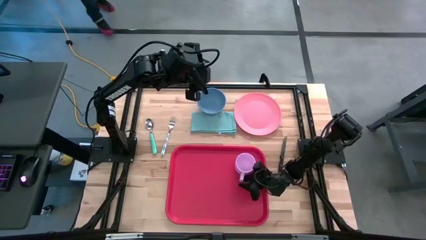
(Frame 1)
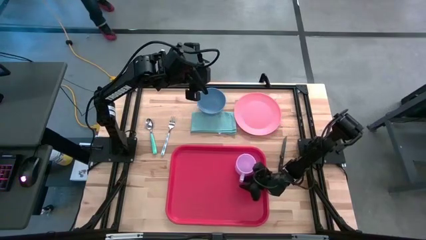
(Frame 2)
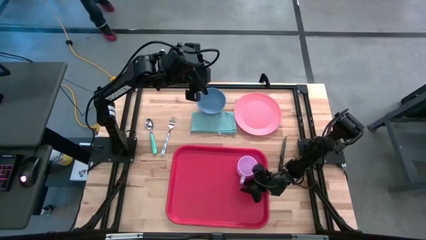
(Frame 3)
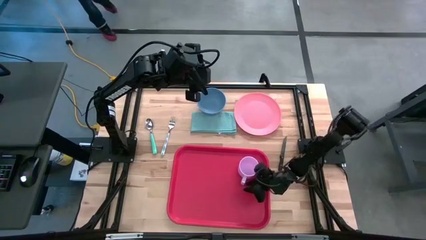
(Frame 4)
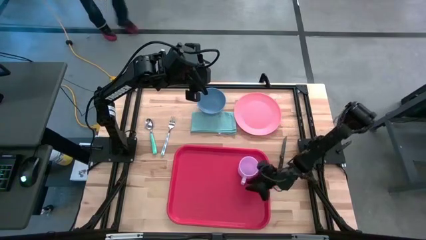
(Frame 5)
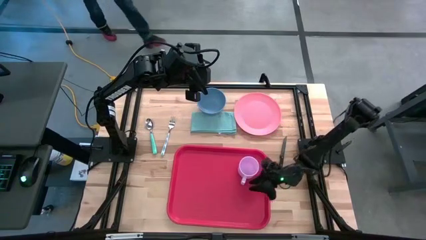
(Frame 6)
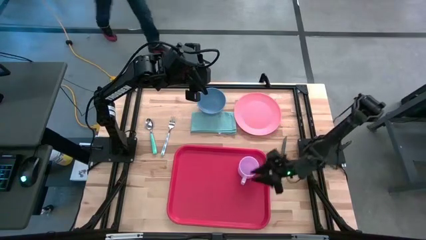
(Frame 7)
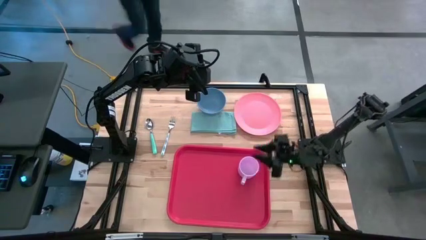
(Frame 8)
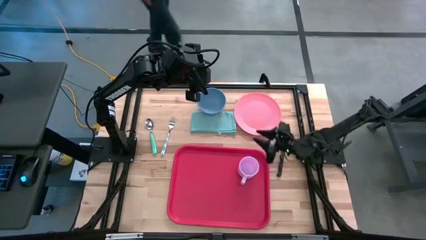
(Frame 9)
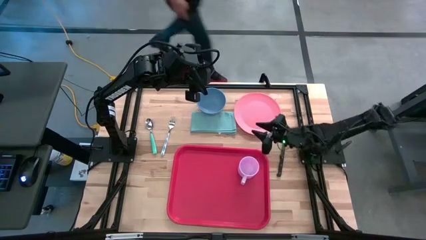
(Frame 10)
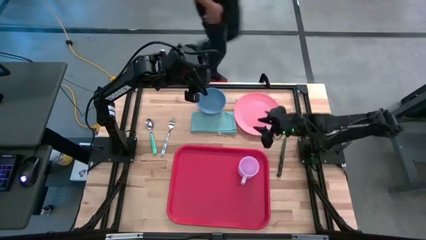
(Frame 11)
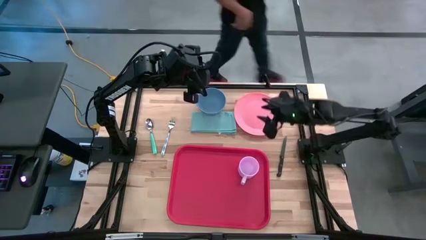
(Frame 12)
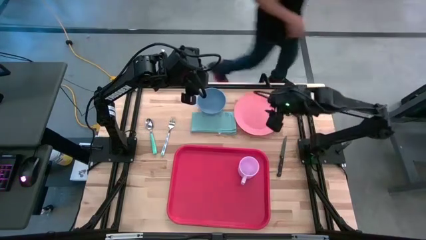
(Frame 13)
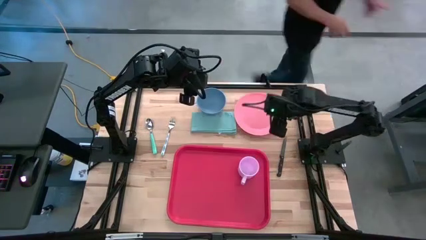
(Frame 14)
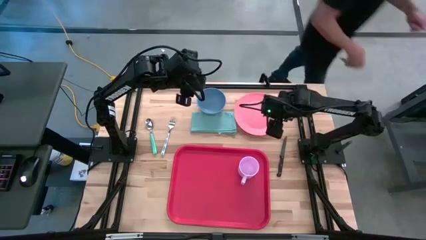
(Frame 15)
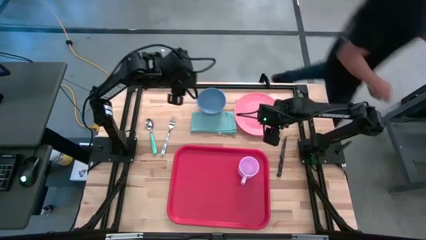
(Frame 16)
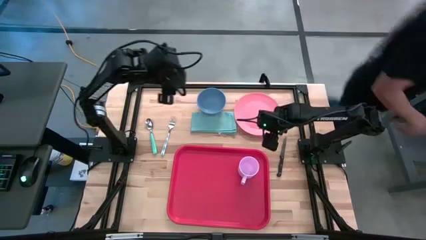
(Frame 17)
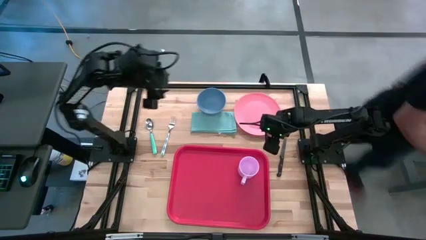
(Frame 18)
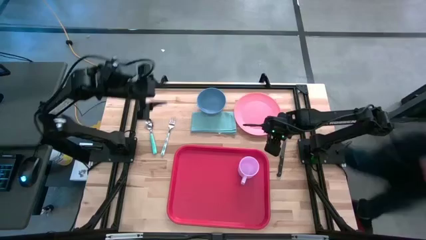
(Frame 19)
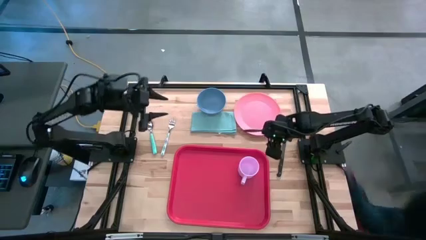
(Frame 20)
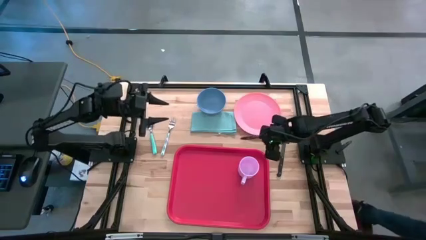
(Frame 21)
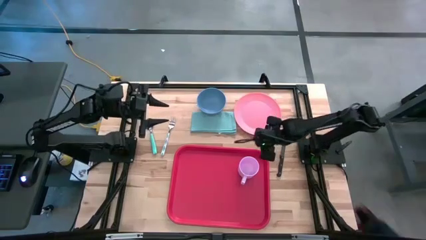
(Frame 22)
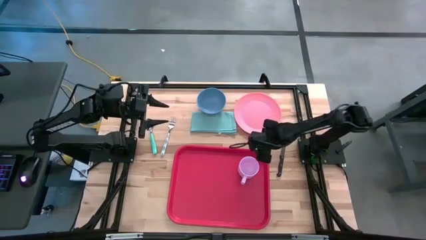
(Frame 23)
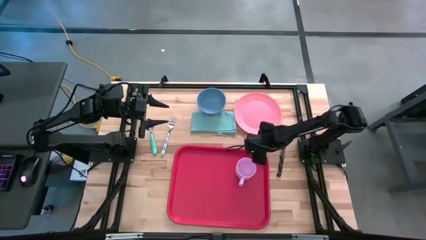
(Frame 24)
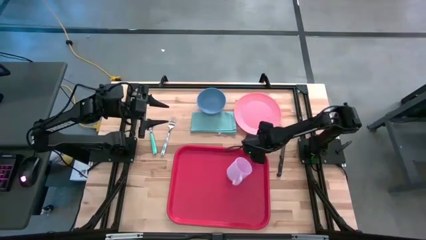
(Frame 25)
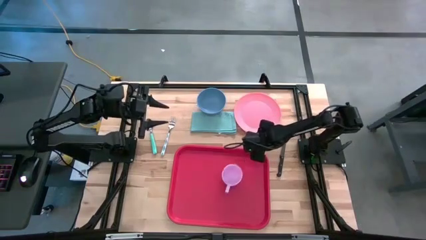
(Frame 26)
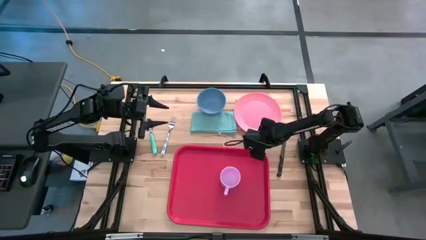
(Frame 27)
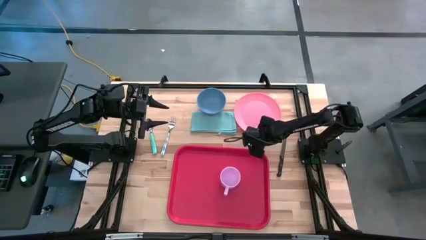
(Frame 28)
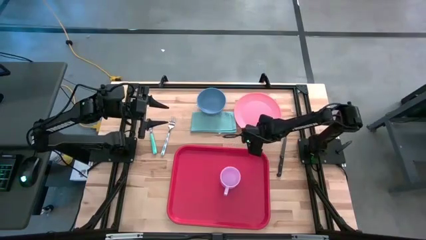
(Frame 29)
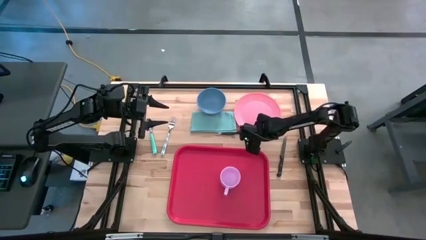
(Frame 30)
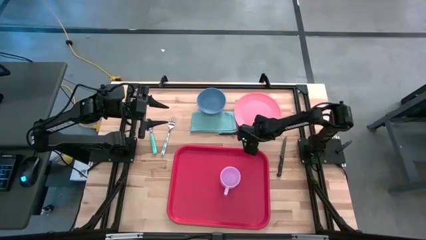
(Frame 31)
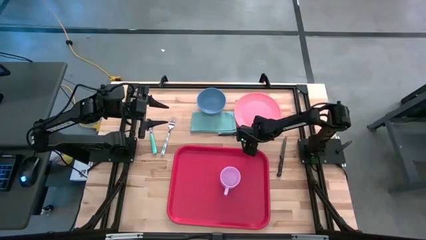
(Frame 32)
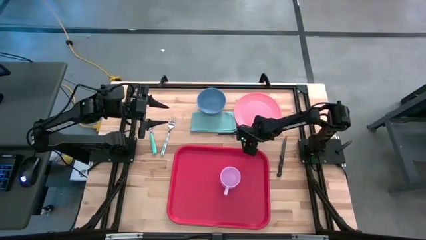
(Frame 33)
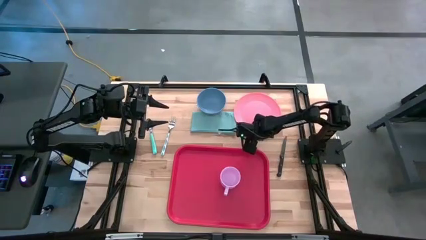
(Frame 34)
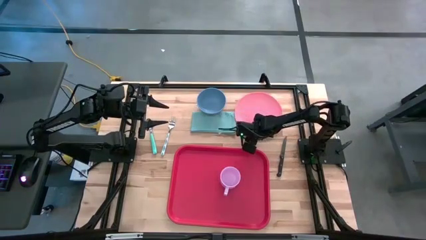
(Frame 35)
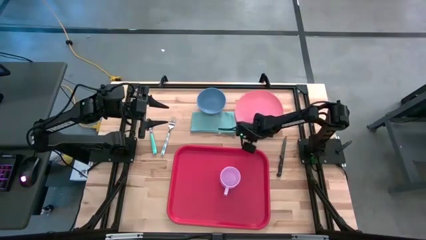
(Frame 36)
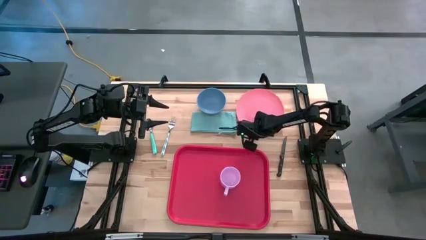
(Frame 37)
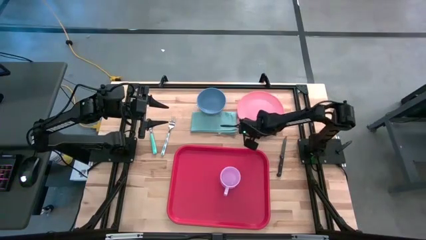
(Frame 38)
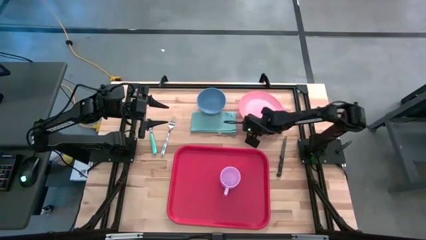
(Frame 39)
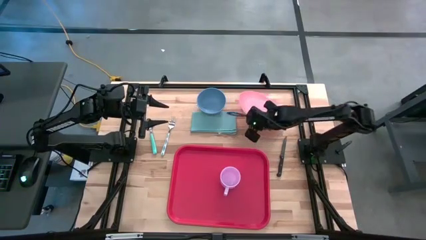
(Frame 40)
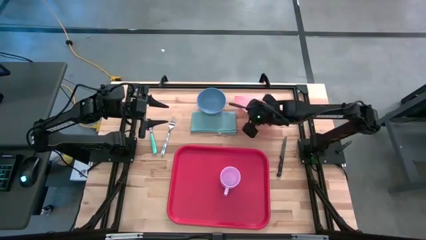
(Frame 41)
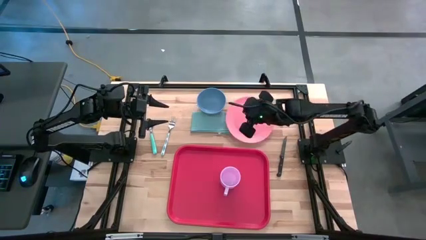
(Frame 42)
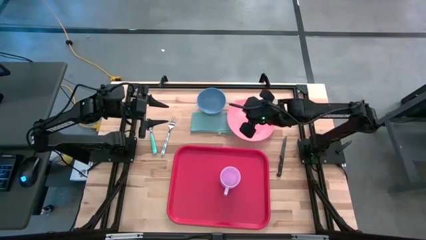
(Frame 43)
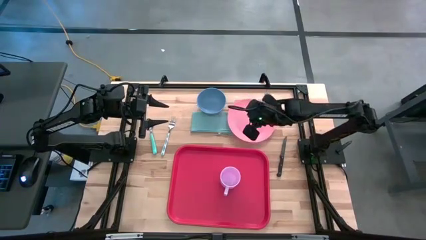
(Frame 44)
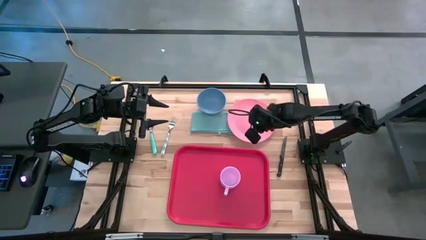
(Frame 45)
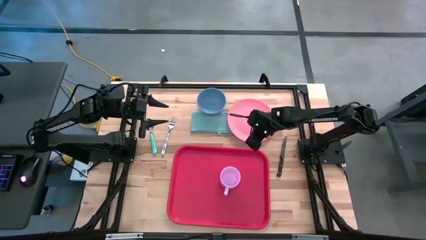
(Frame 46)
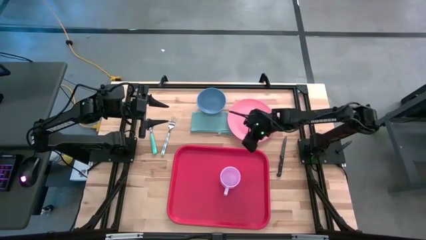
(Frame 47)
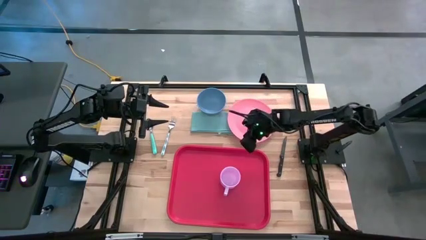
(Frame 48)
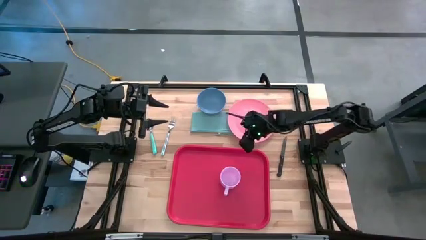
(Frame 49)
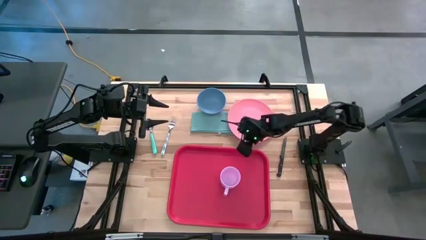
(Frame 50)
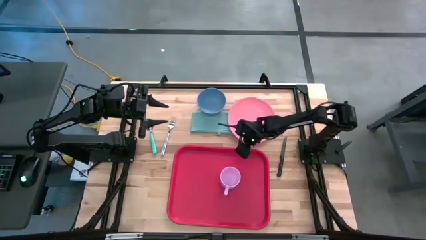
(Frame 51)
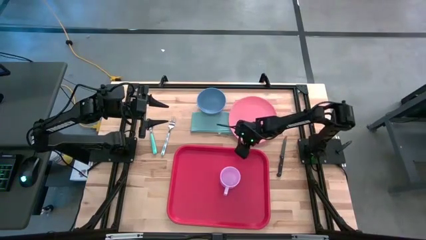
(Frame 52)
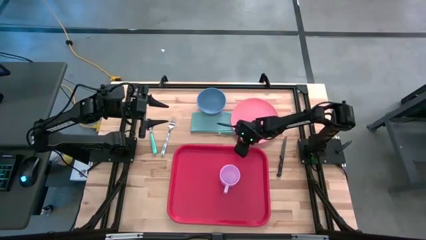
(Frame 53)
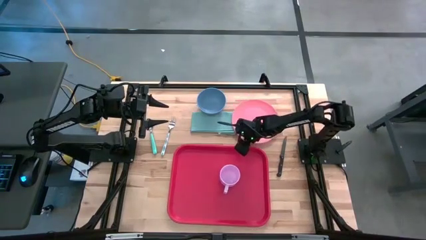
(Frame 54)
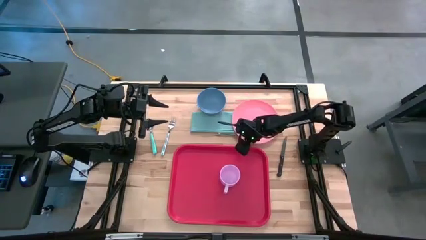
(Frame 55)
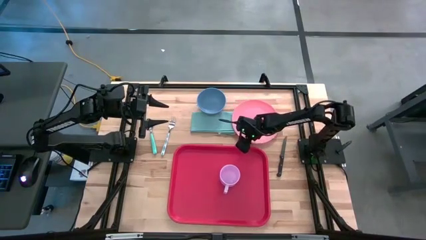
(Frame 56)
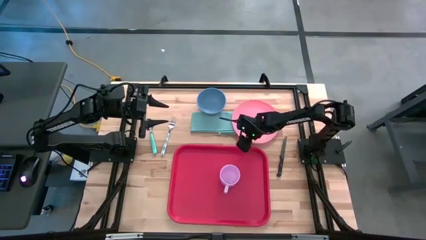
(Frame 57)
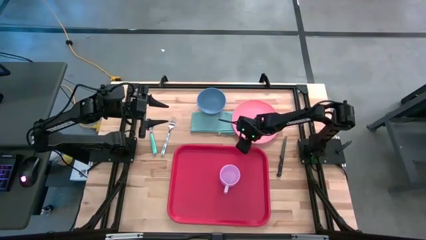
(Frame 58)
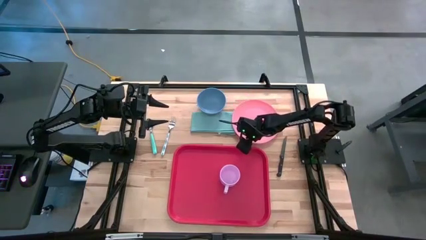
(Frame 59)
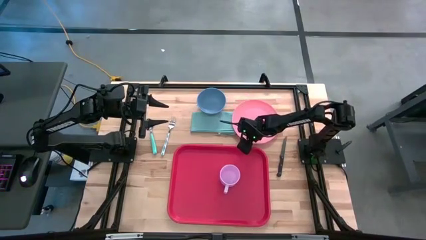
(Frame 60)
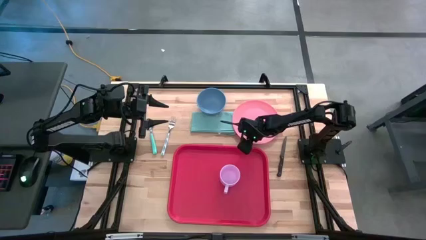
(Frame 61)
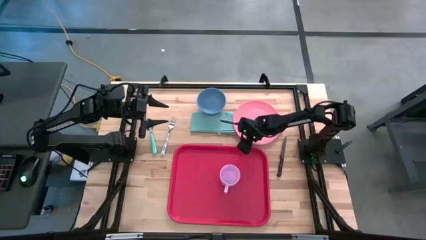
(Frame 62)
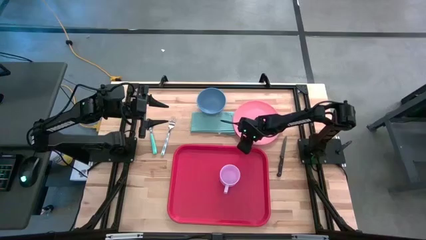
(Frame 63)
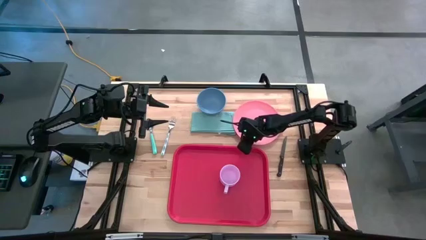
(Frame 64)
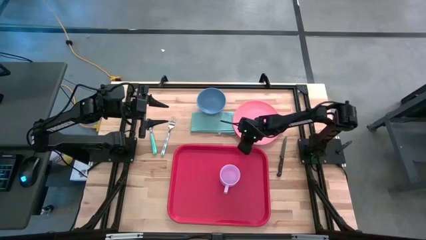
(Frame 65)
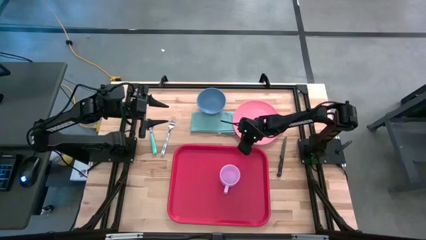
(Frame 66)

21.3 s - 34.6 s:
Task: Set up tray
Put the pink plate on the tray to the left of the purple mug

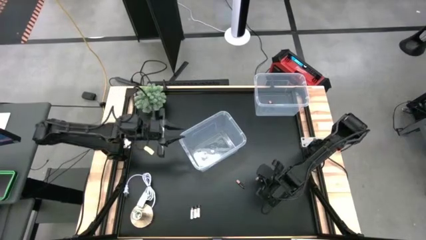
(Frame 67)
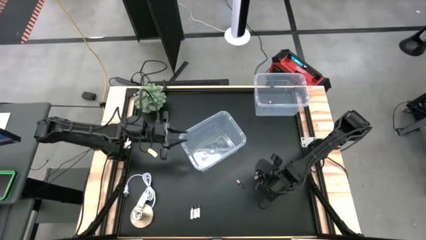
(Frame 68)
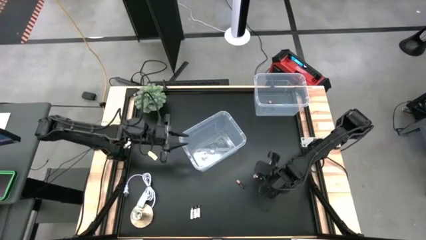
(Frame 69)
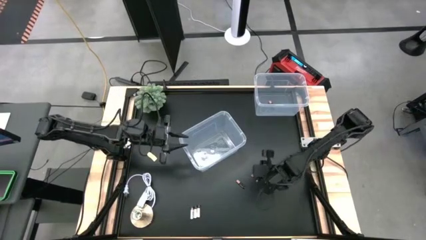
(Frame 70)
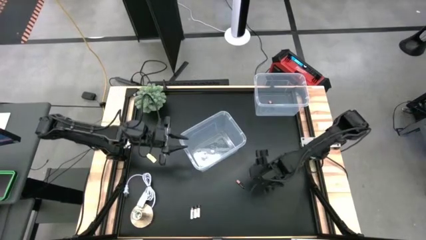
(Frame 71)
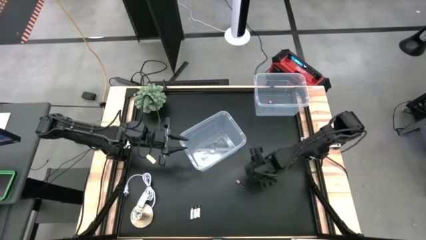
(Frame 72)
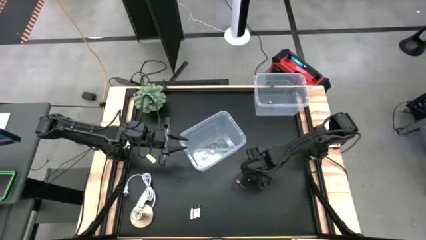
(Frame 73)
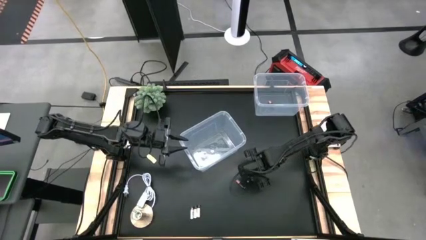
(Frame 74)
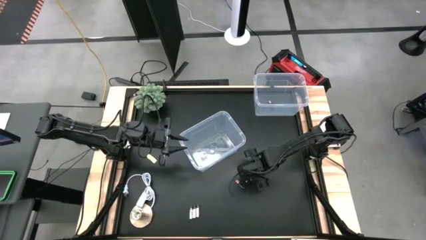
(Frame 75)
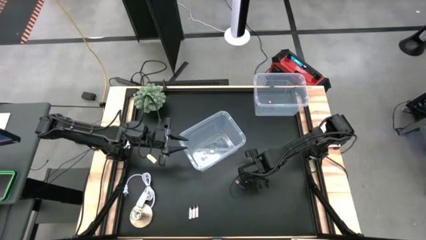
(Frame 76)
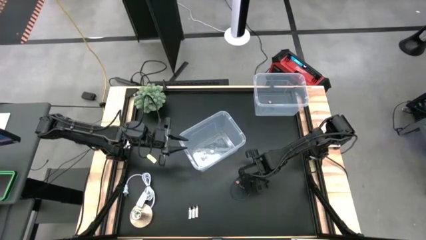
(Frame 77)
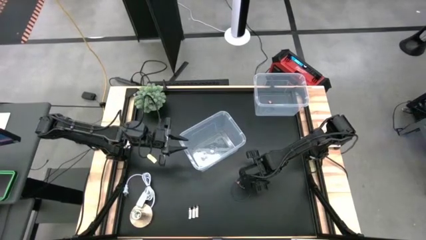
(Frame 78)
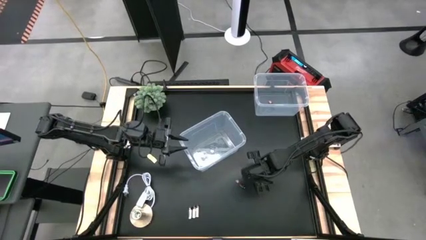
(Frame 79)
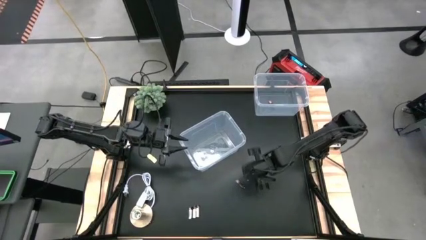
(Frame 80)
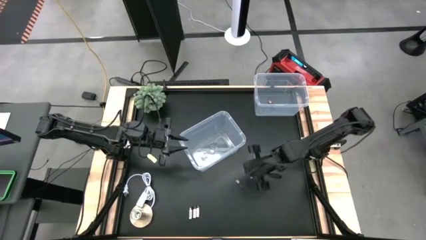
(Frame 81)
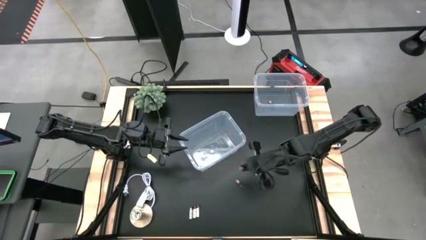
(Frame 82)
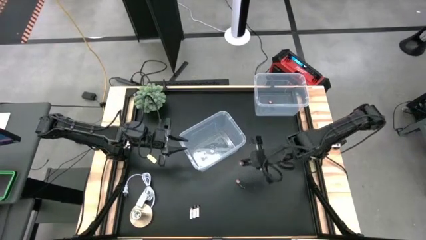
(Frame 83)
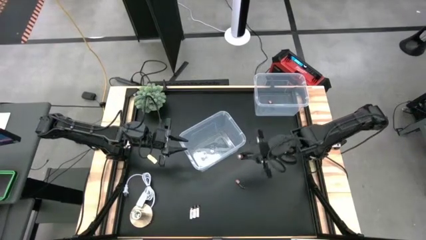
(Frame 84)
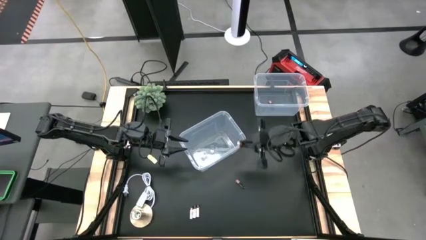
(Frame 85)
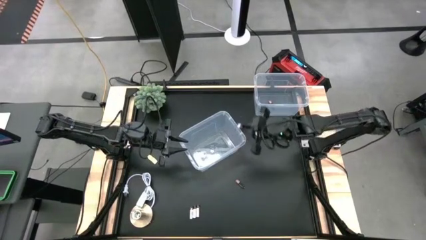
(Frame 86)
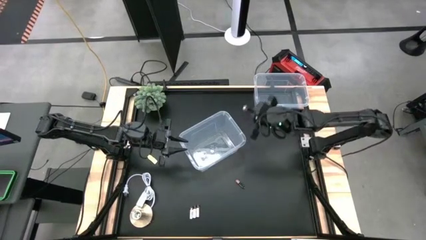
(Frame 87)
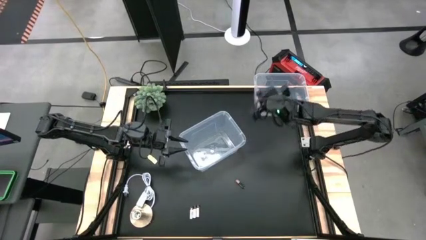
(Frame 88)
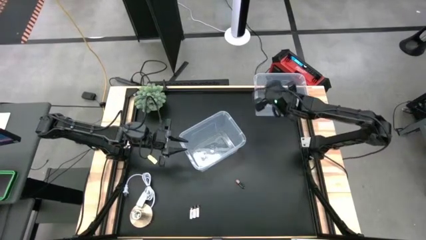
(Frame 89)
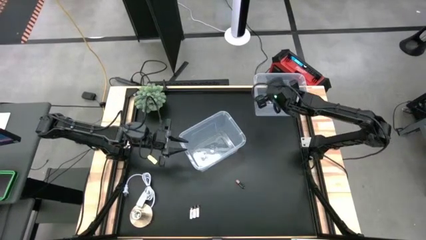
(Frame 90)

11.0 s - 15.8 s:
Task: Sort batteries
Put the right black battery into the top transparent bin
